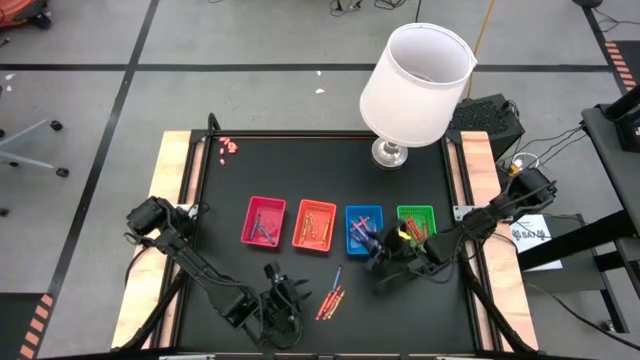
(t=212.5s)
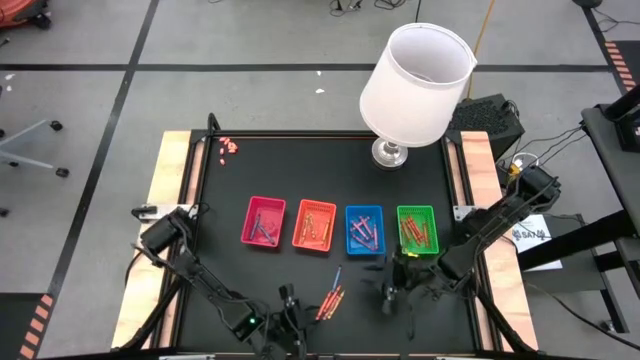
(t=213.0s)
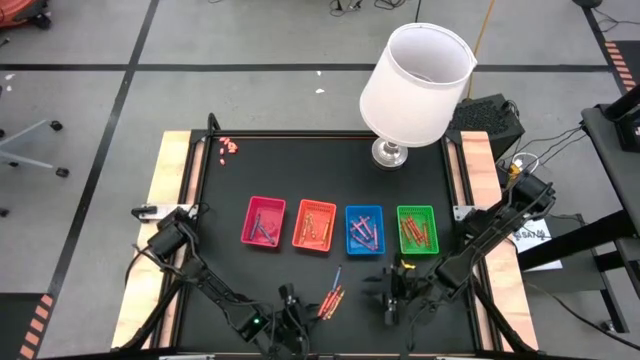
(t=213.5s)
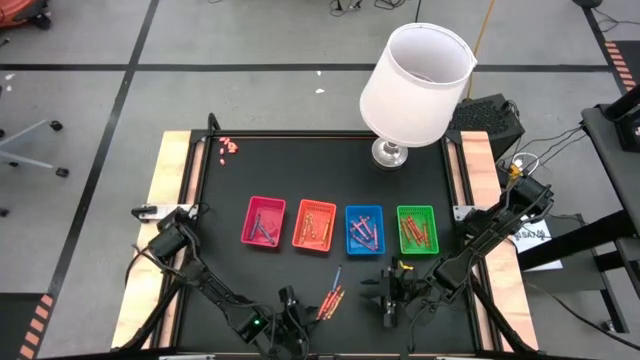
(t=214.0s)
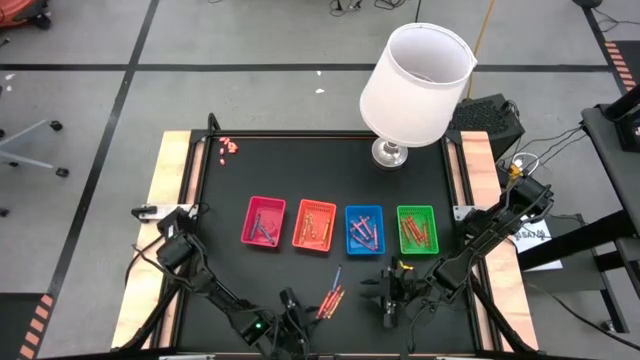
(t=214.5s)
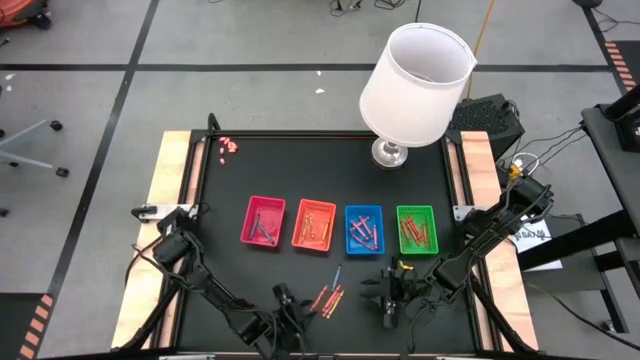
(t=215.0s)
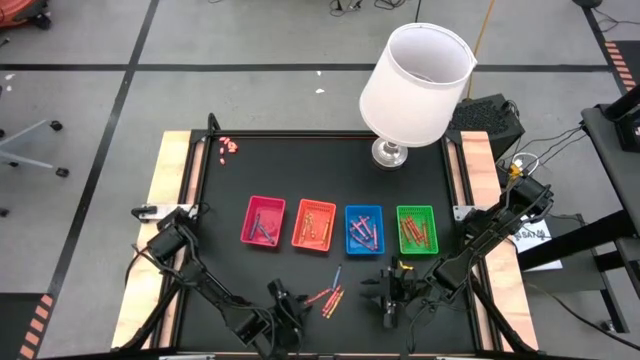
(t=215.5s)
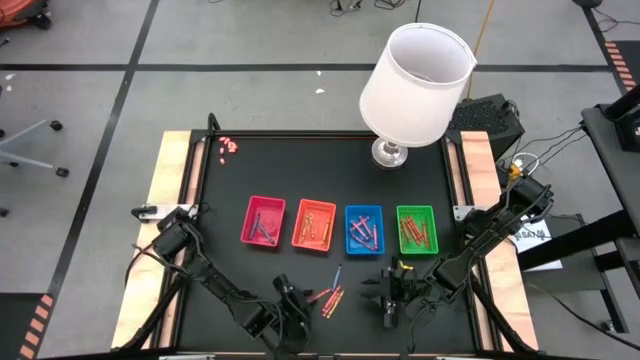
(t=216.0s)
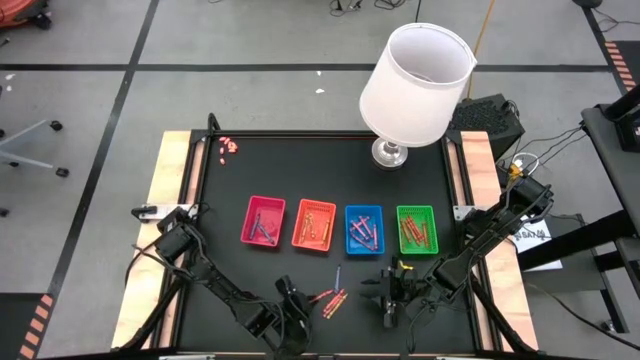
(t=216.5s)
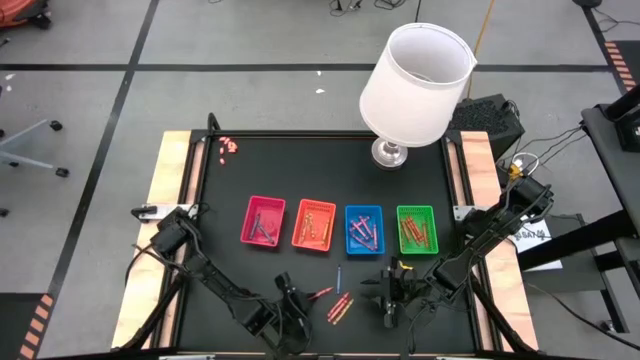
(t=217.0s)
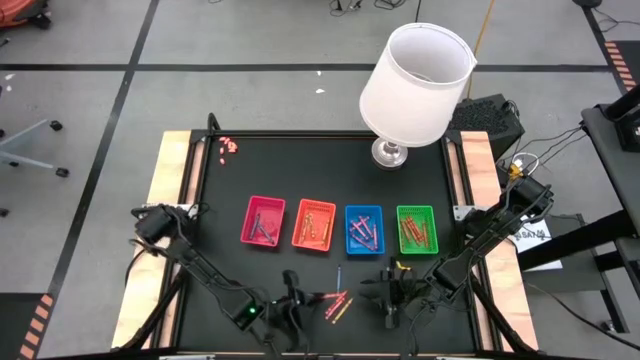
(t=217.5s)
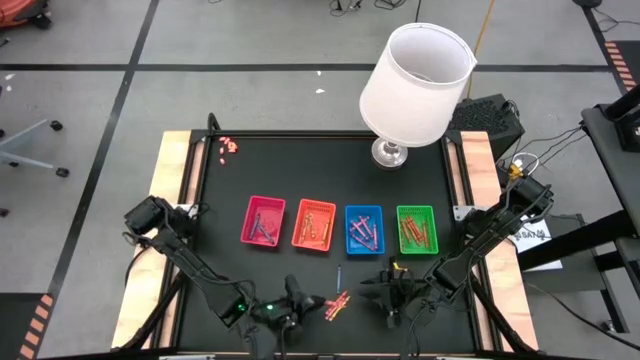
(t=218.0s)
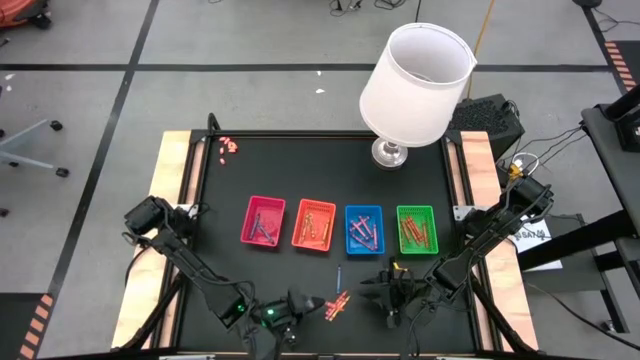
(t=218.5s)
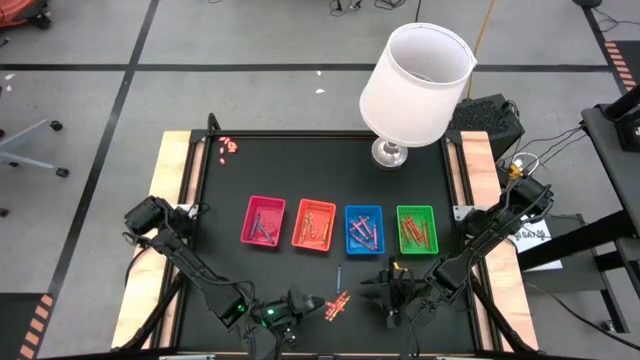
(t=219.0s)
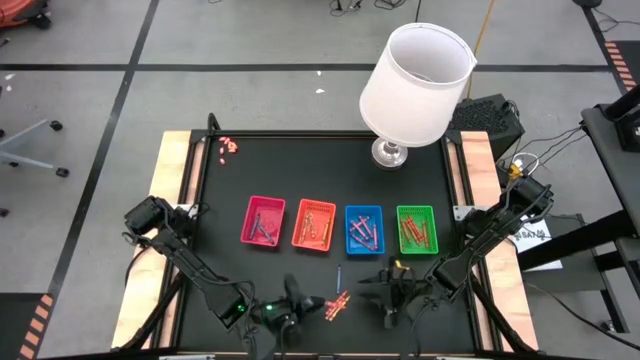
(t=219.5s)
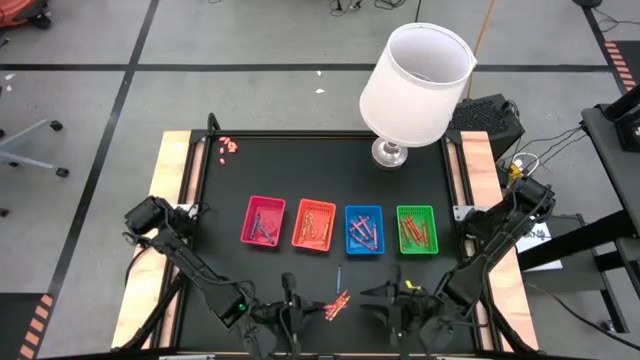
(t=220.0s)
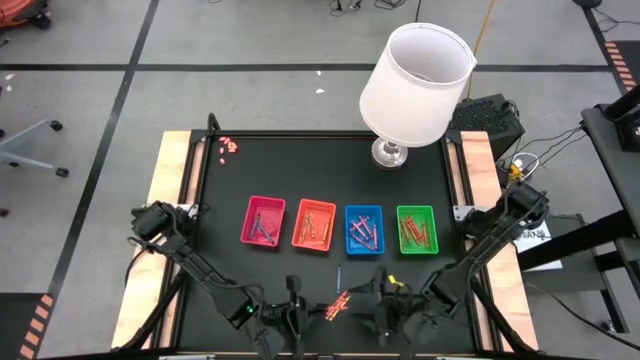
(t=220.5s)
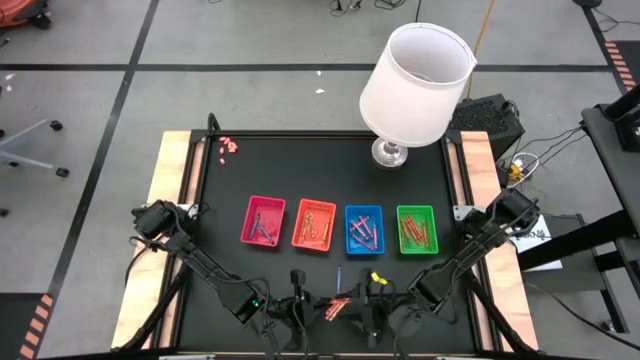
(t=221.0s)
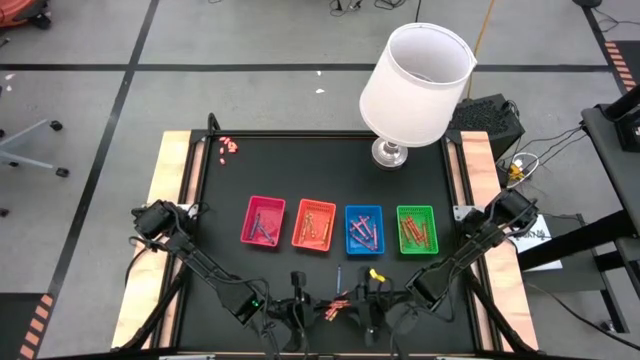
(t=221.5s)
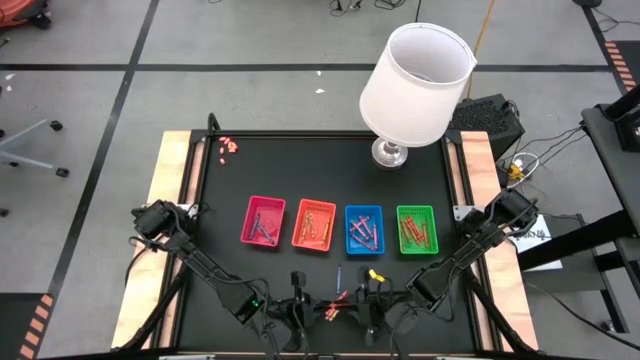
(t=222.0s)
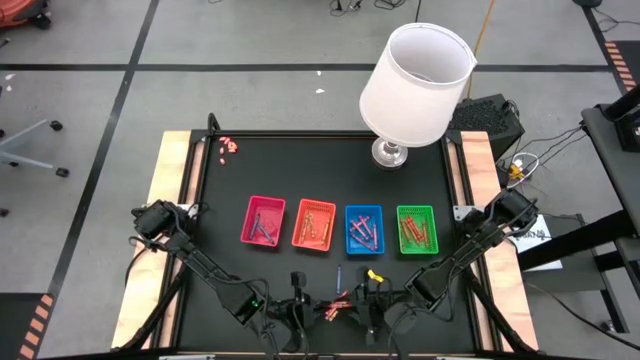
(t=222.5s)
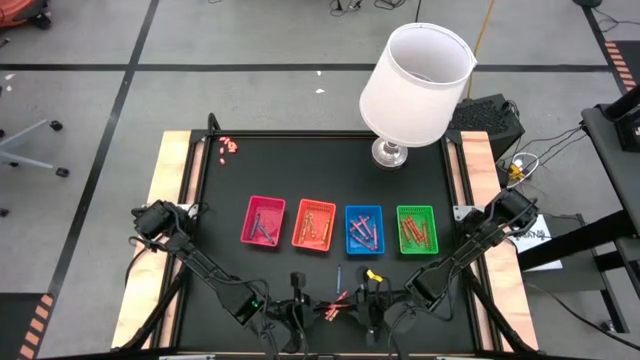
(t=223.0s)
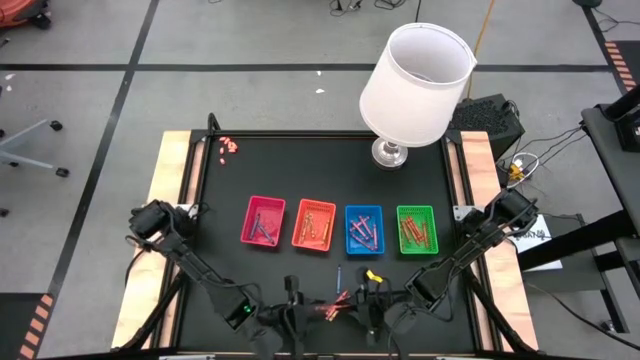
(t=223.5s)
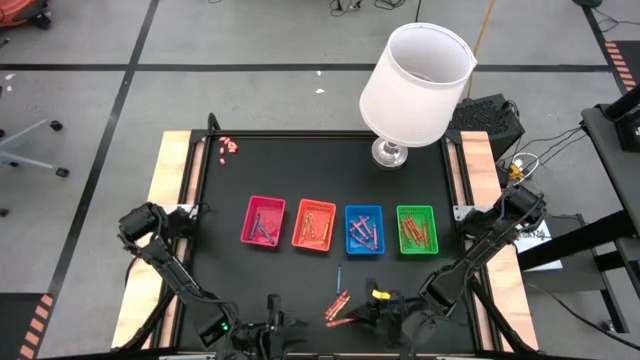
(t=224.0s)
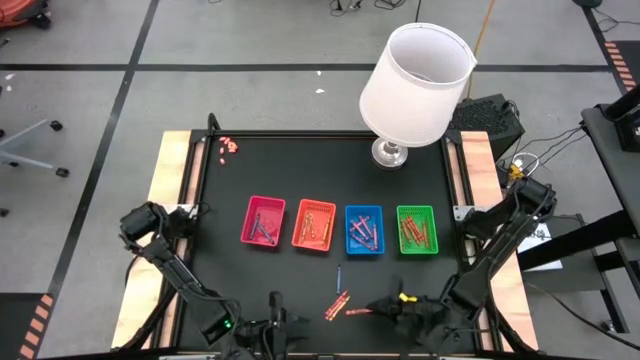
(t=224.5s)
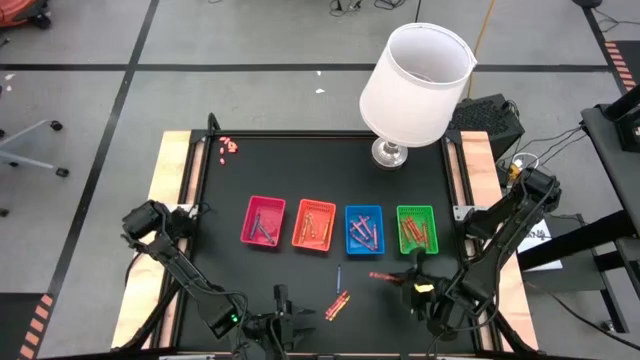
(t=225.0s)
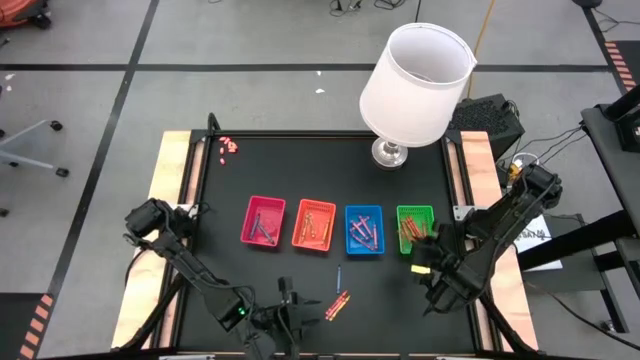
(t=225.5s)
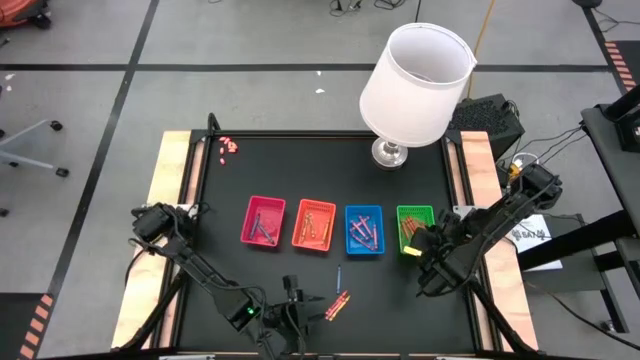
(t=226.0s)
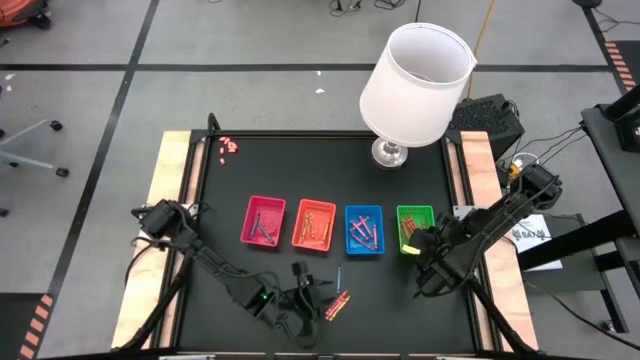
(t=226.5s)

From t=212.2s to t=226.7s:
Task: Sort crayons
Put the orange crayon into the green bin

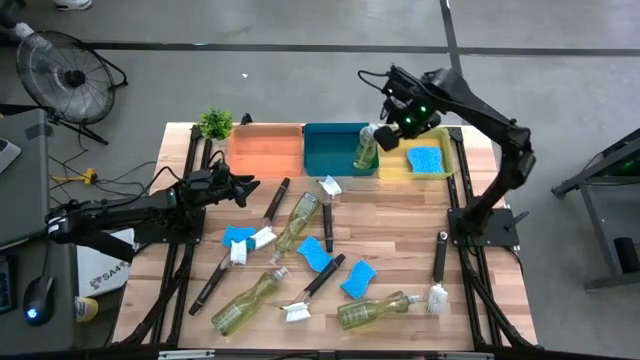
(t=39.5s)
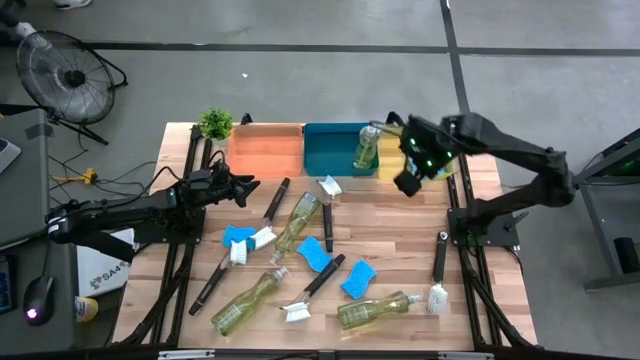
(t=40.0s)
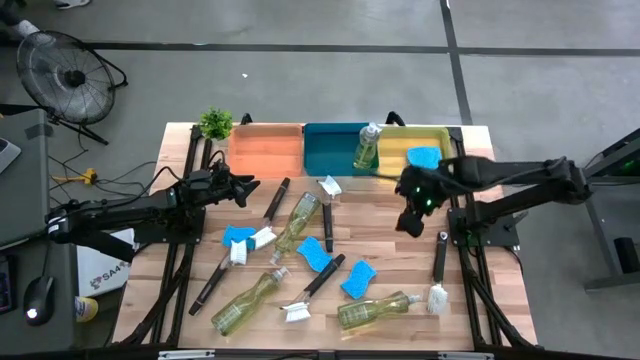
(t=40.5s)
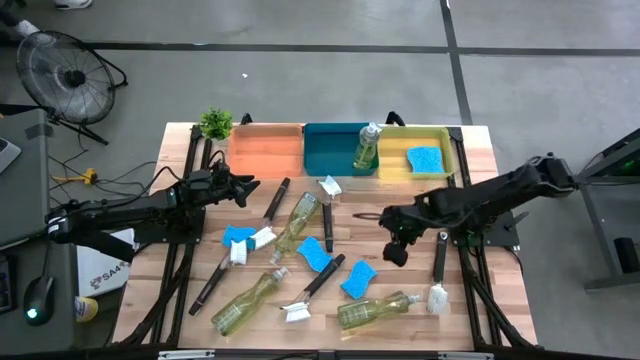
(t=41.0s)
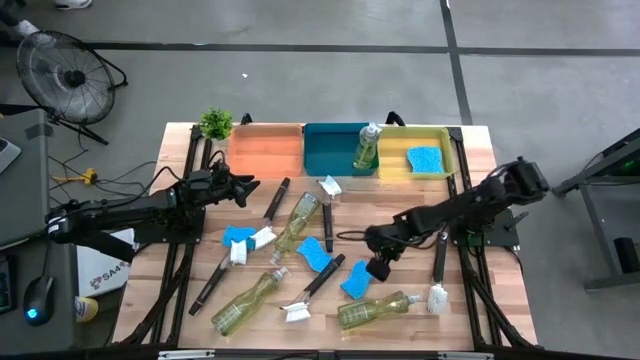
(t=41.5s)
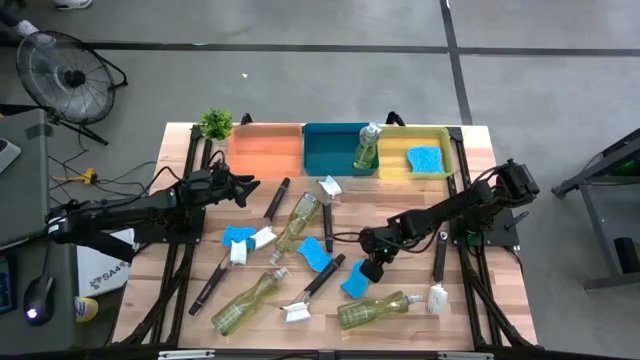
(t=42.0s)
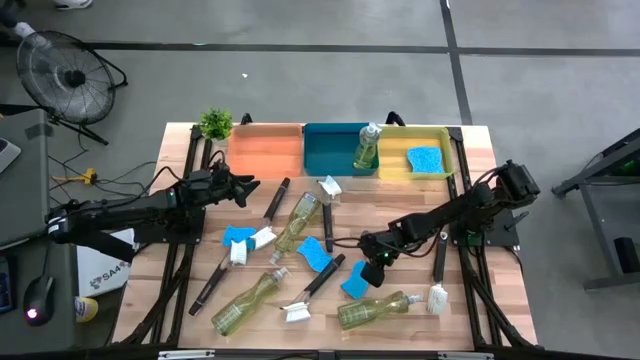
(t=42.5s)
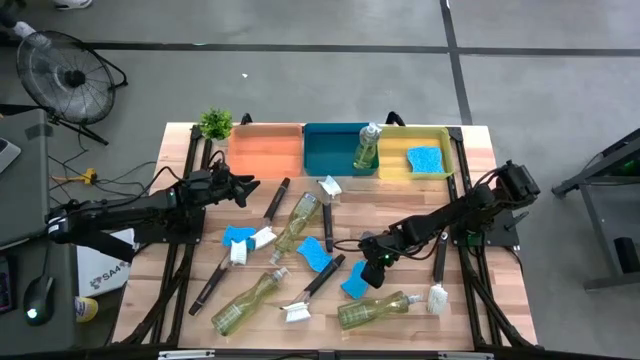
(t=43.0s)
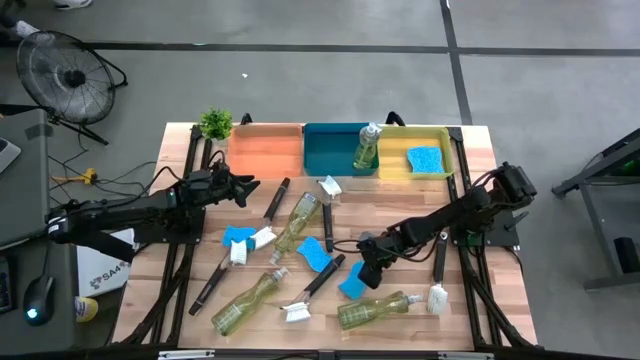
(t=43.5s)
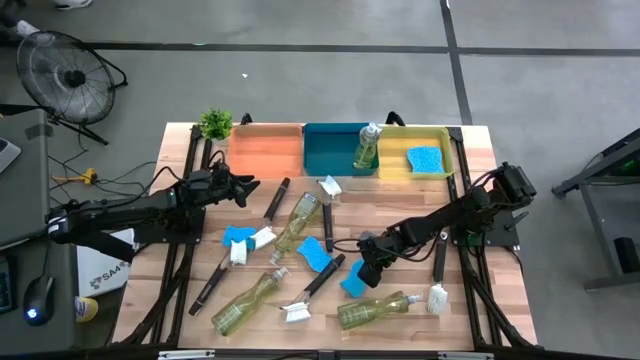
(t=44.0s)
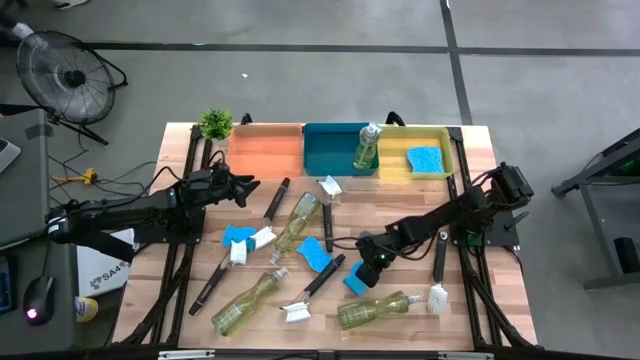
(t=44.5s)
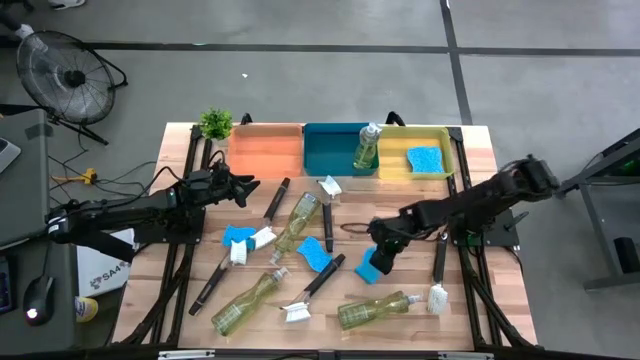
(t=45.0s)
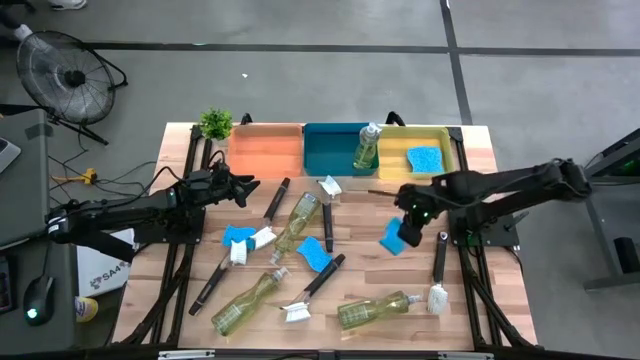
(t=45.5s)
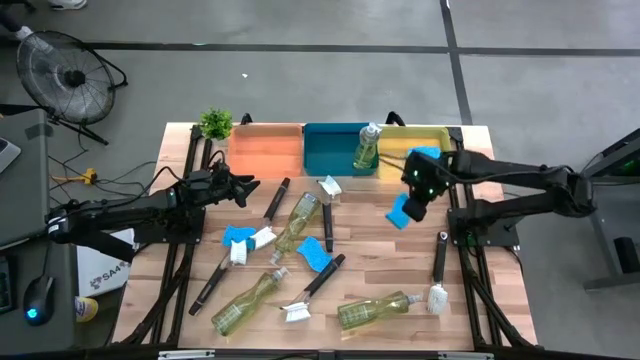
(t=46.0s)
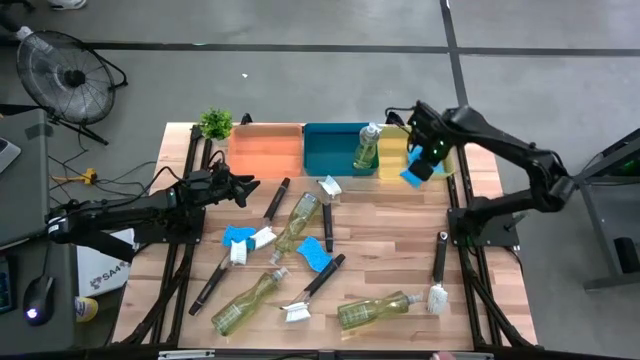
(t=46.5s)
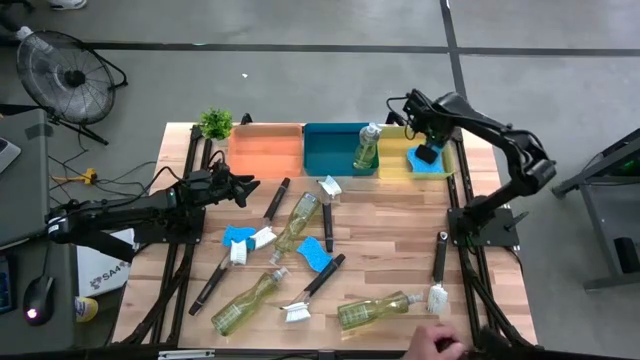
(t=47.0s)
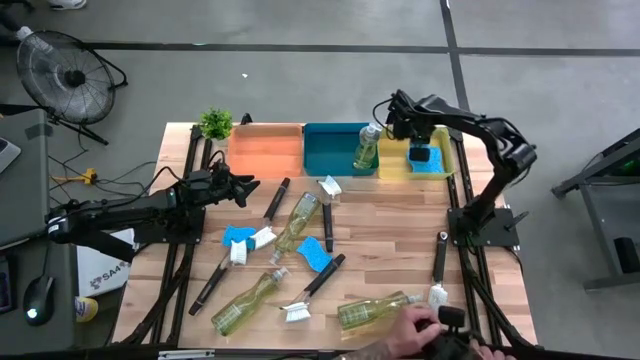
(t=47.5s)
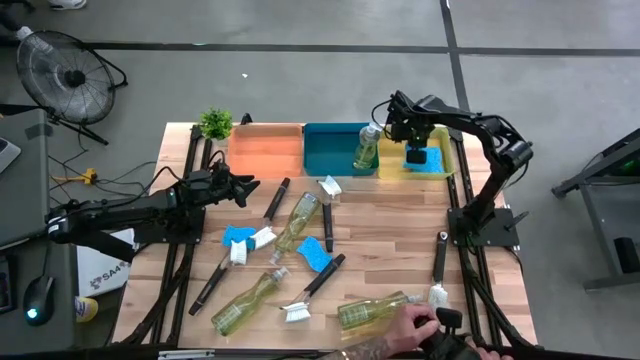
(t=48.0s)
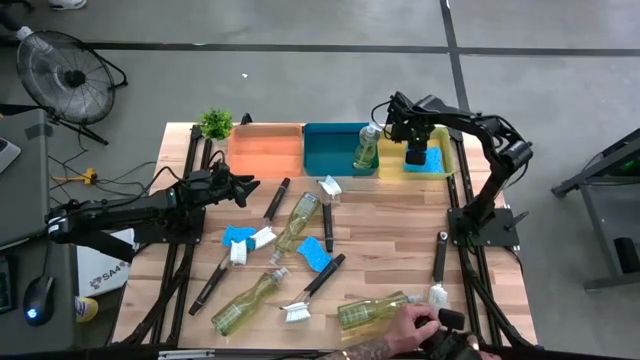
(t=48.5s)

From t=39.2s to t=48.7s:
Task: Pick & Place Kitchen Sink Supplies
Put the blue sponge into the yellow bin
